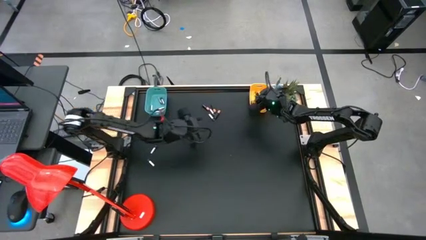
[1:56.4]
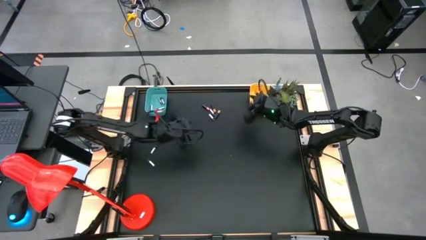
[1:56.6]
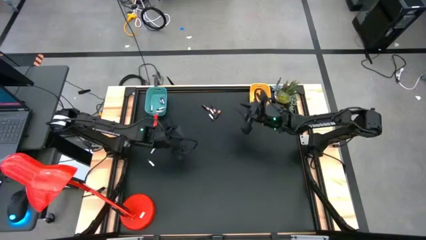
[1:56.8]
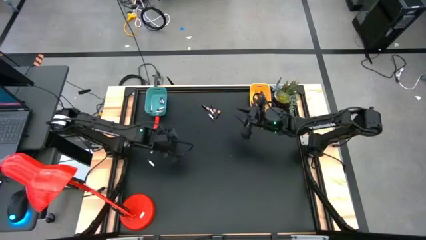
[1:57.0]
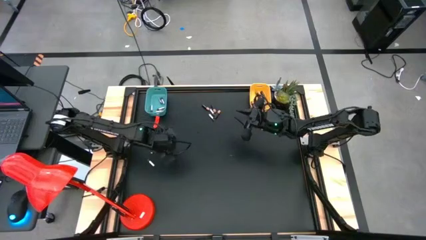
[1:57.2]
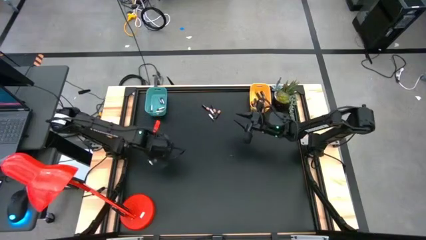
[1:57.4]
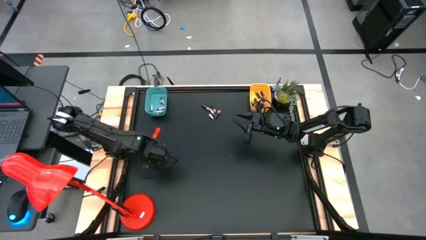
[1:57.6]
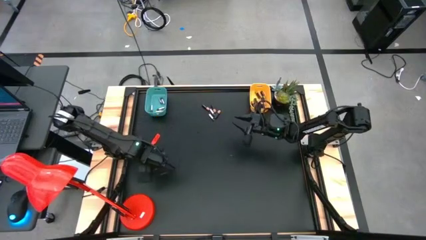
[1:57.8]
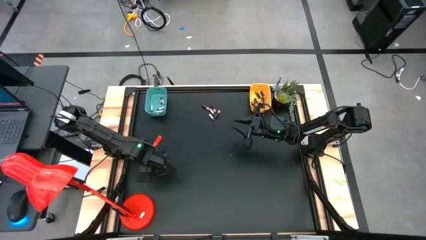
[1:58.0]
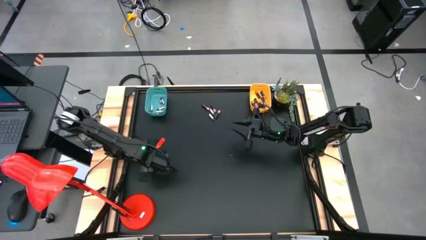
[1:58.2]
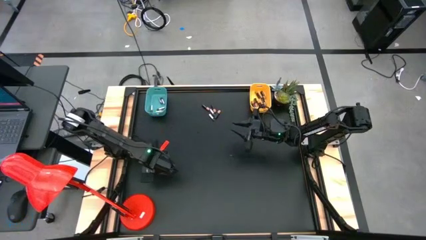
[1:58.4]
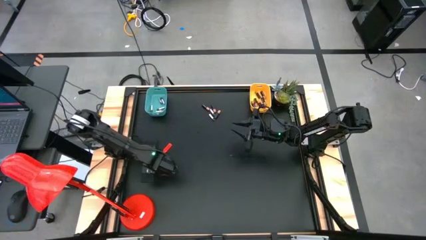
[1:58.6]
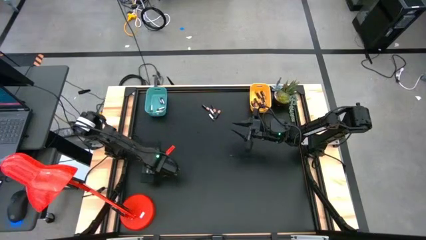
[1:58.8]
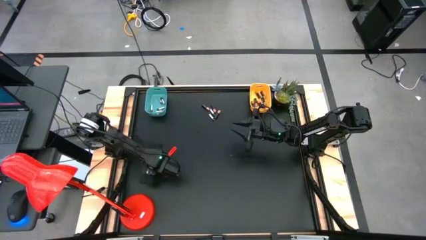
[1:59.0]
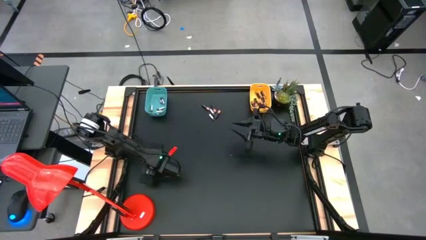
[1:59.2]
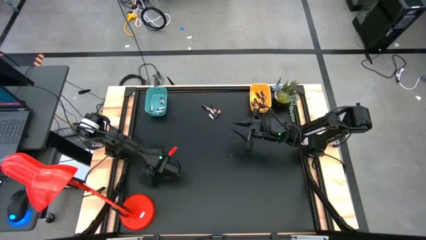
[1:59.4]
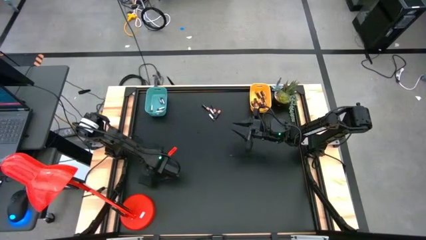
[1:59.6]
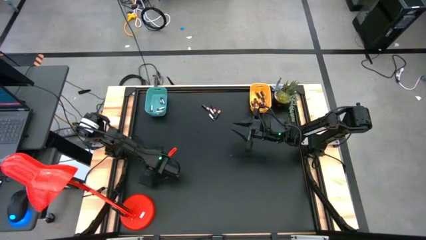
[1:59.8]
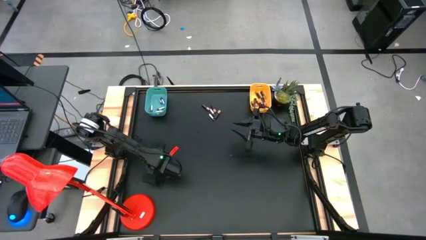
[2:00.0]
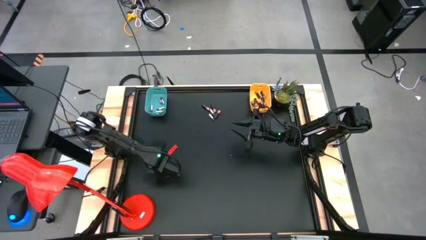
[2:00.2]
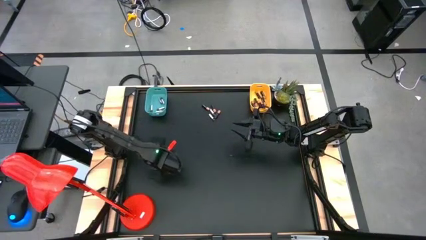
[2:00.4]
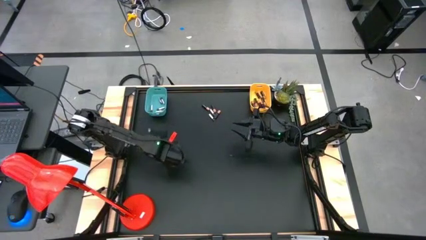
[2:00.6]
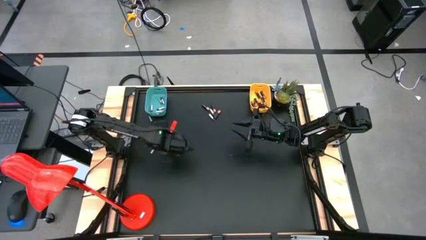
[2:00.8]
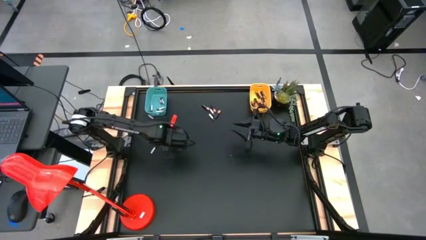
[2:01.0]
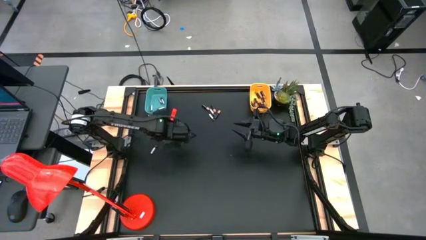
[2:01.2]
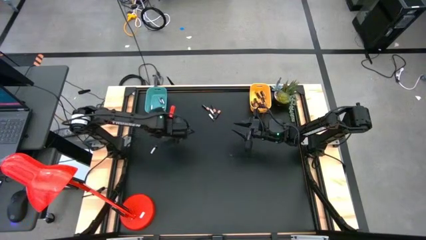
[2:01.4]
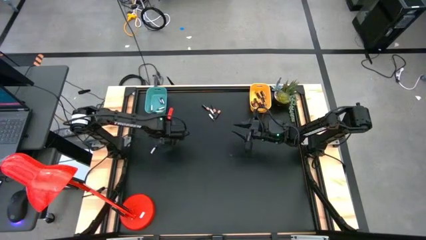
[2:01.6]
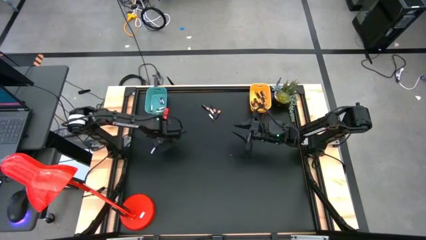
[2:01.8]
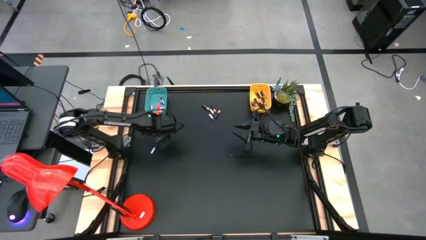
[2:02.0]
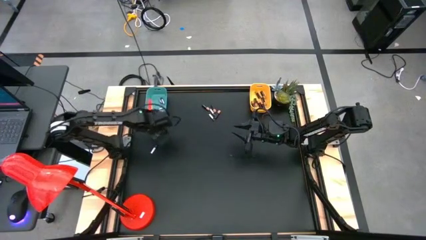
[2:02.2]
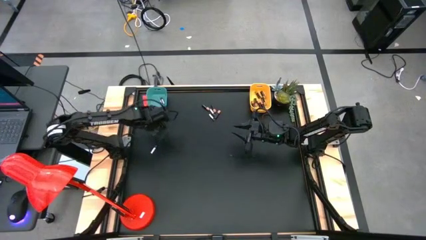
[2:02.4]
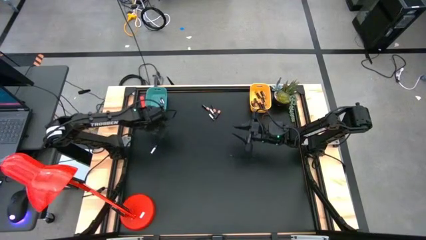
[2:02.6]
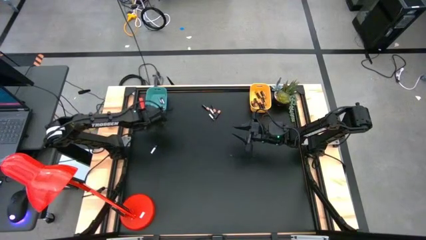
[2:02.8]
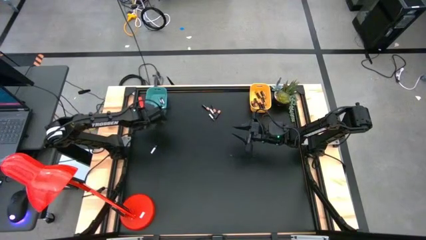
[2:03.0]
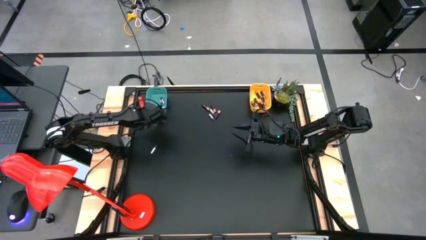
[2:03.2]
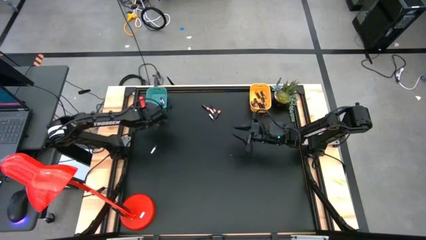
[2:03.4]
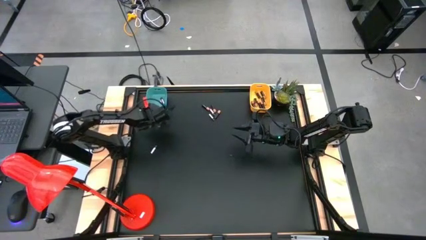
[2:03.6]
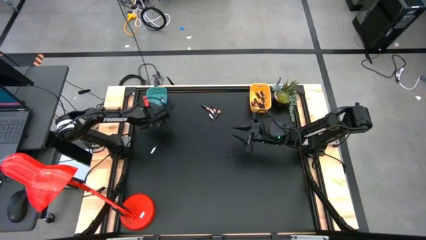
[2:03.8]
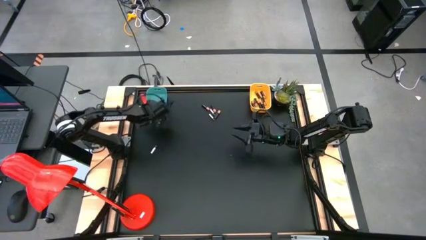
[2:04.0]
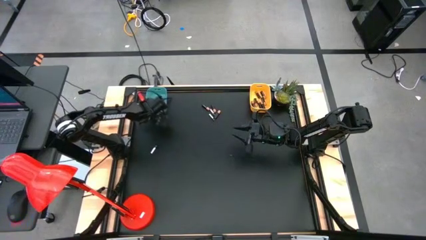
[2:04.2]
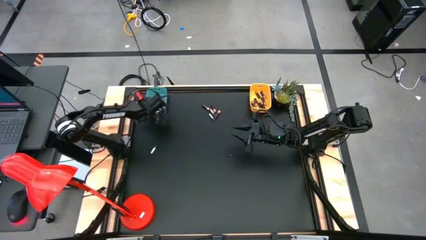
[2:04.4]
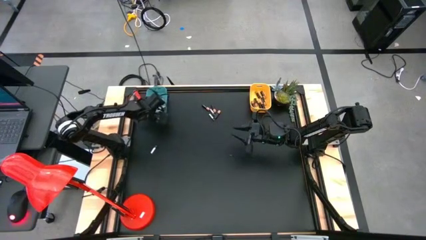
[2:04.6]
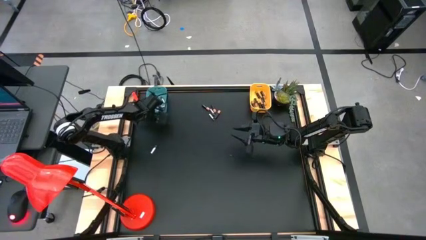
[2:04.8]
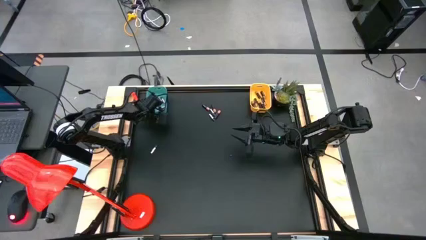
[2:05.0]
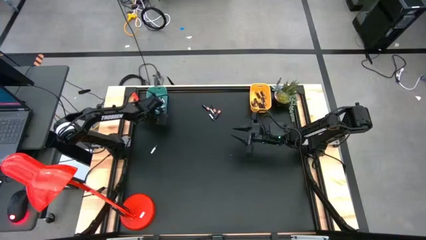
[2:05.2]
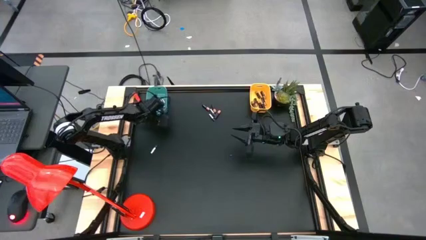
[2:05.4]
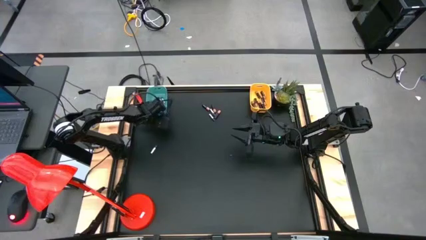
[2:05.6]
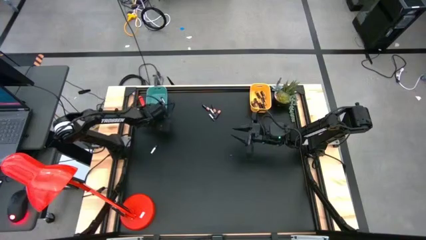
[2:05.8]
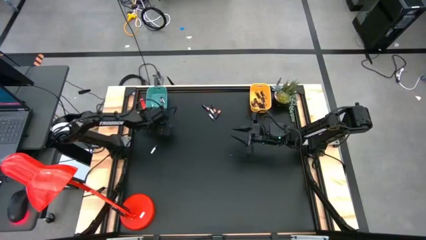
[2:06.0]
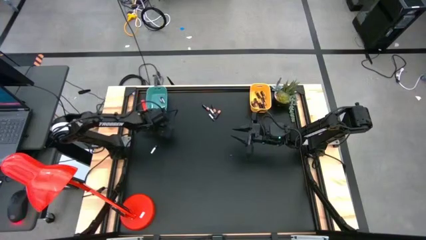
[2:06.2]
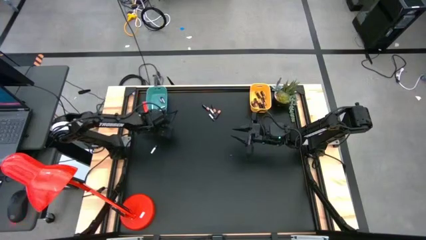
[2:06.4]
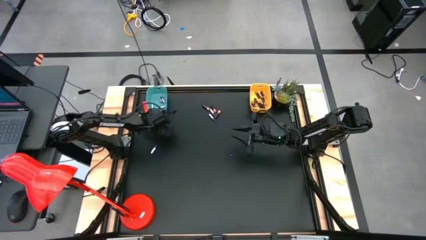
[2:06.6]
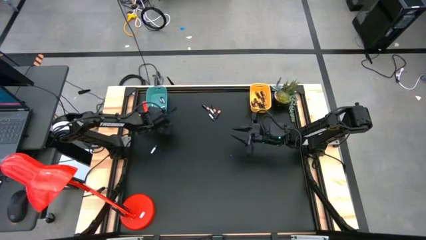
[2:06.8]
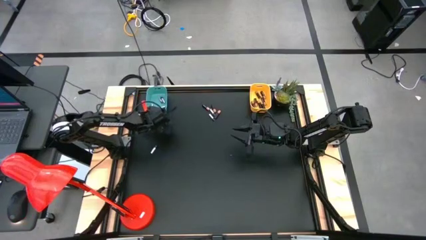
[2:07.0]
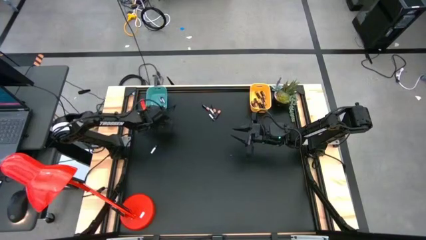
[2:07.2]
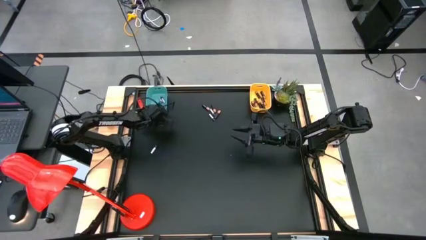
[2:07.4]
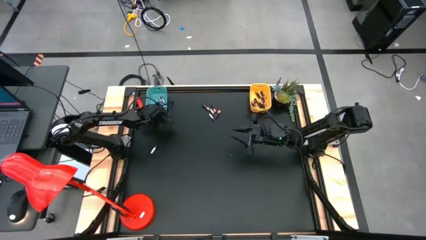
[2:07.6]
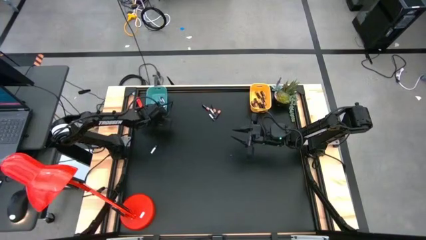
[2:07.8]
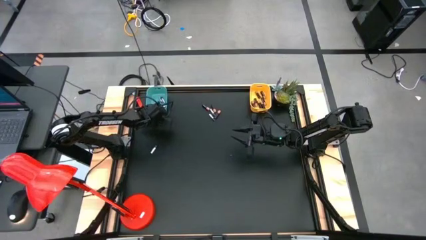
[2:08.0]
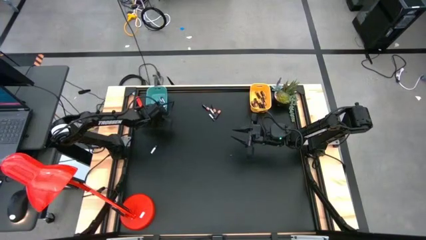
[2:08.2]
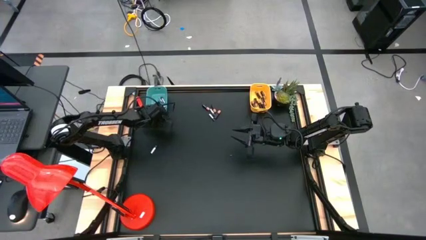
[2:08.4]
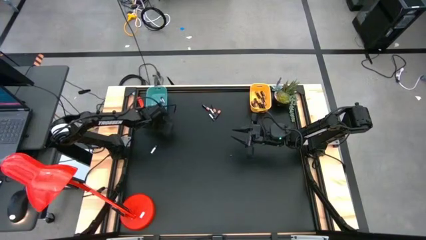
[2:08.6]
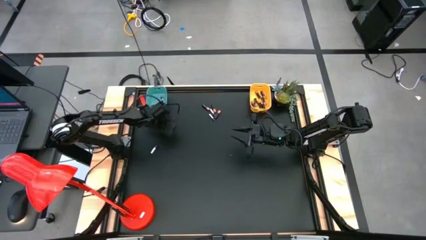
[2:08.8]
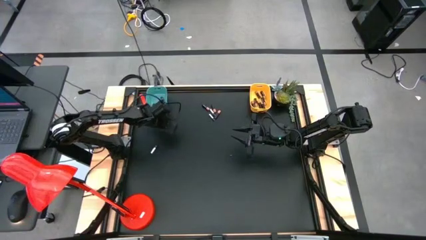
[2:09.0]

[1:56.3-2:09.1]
Task: Sort batteries
Put the silver battery into the blue bin

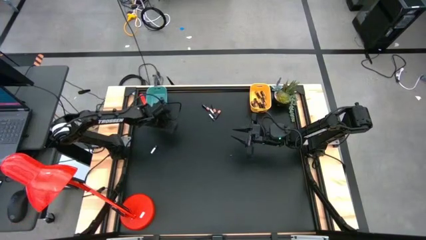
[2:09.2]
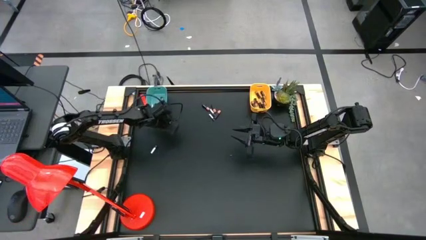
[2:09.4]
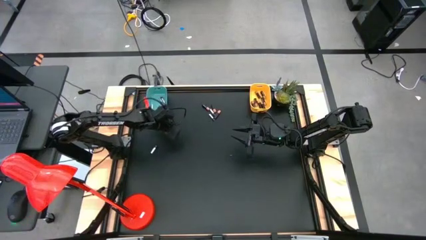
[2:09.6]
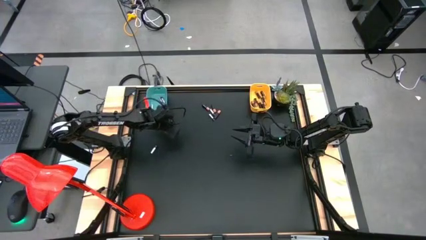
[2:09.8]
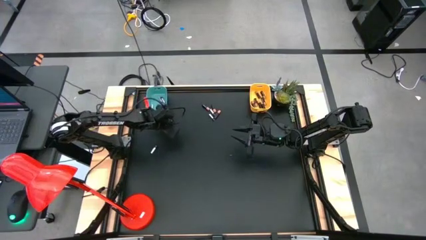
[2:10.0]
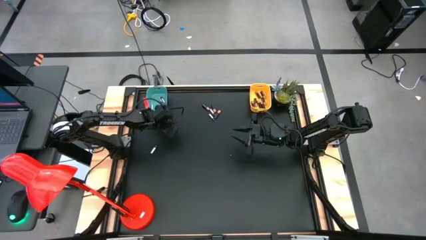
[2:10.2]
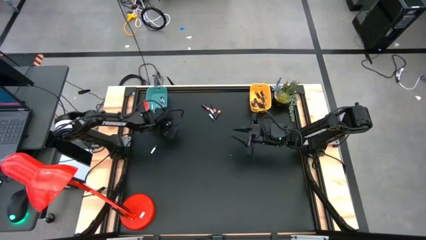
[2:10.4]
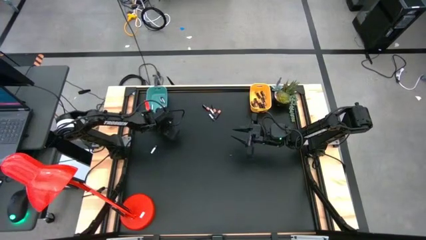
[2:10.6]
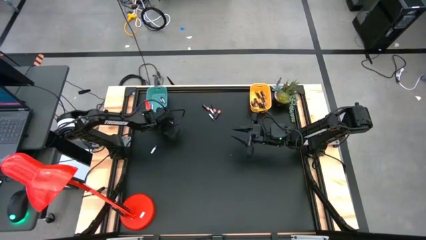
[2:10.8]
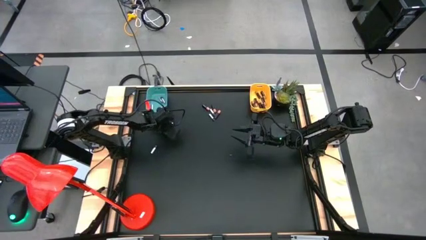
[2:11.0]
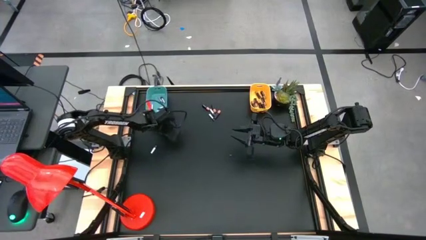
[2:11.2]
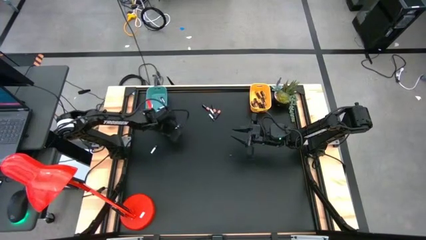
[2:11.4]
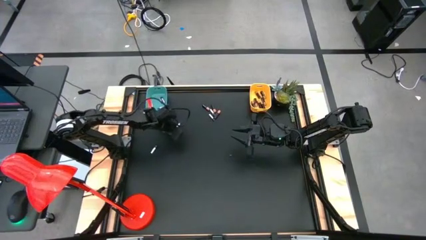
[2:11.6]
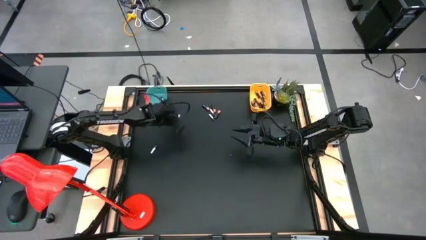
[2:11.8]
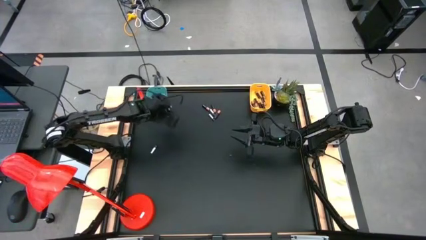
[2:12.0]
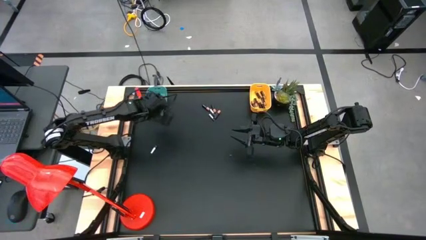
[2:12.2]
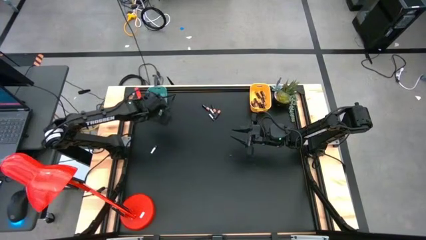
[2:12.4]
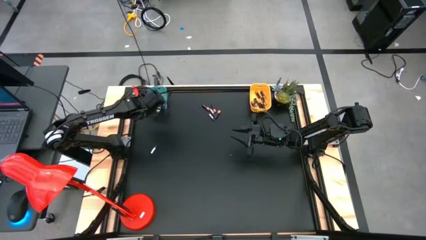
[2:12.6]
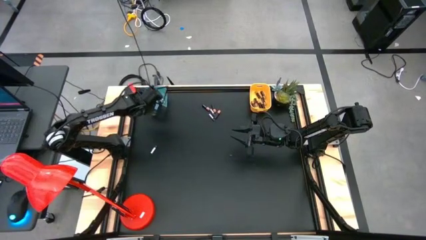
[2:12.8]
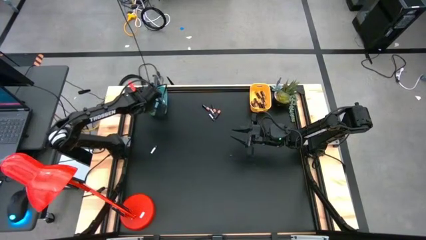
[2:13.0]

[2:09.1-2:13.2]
Put the silver battery into the blue bin
